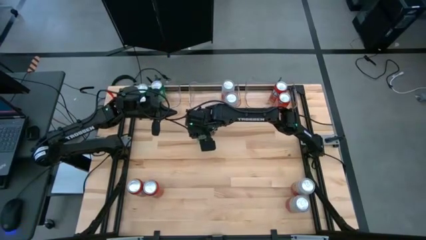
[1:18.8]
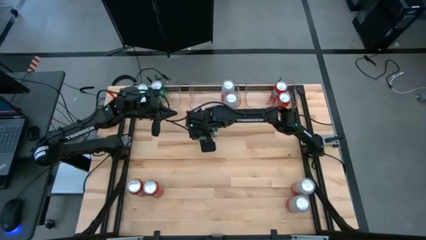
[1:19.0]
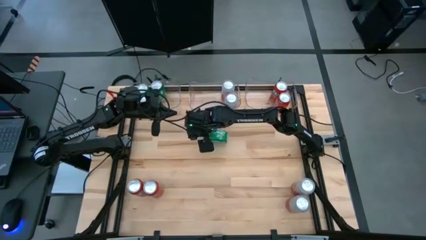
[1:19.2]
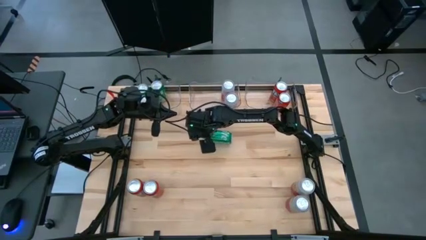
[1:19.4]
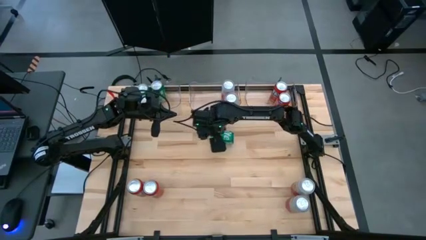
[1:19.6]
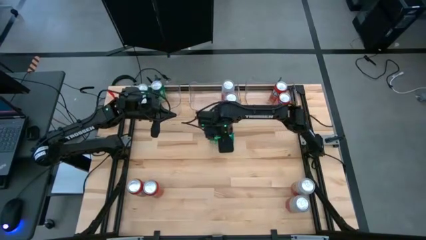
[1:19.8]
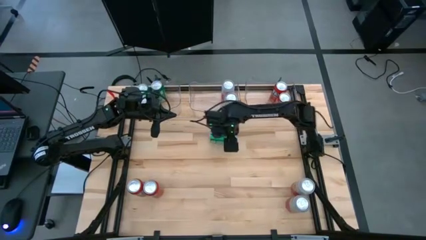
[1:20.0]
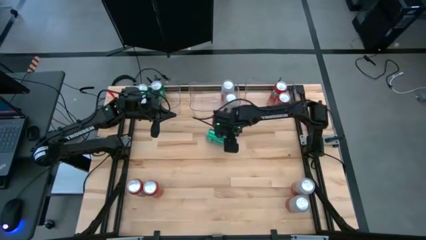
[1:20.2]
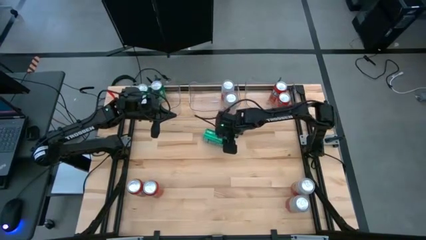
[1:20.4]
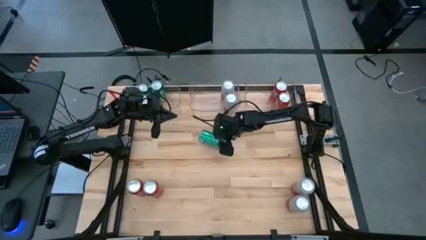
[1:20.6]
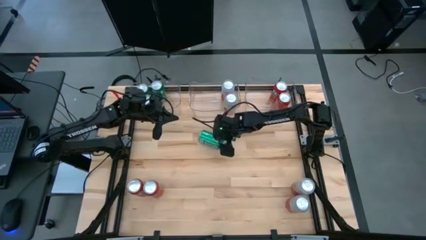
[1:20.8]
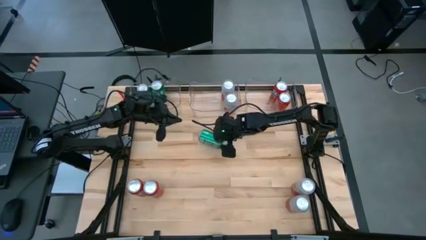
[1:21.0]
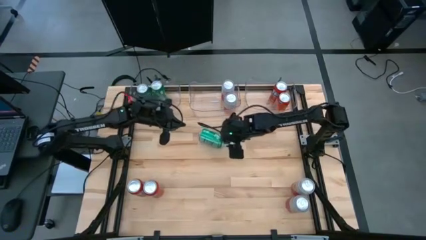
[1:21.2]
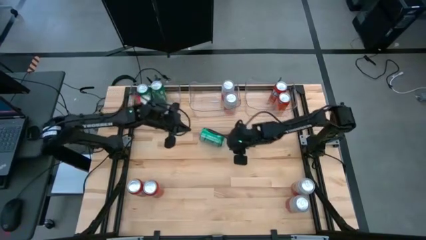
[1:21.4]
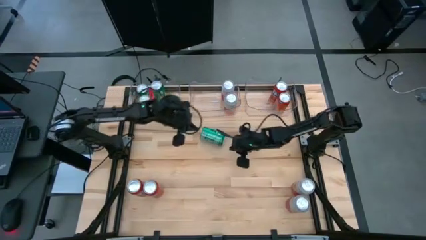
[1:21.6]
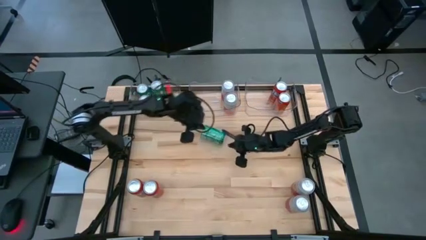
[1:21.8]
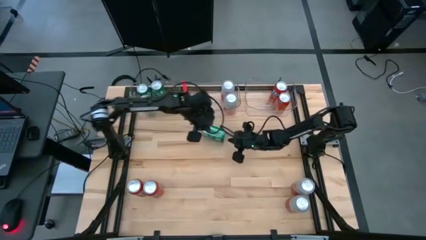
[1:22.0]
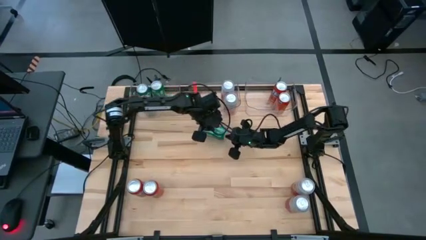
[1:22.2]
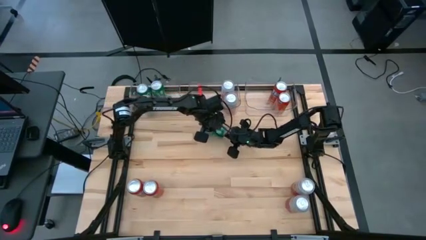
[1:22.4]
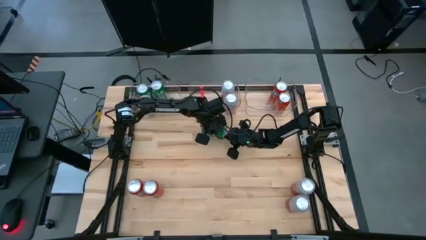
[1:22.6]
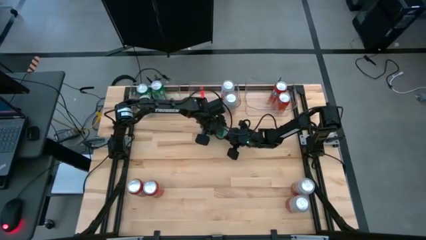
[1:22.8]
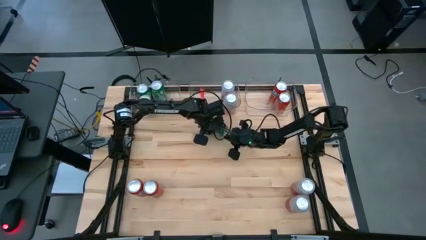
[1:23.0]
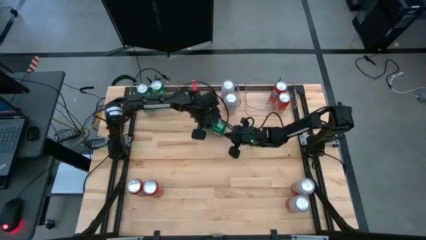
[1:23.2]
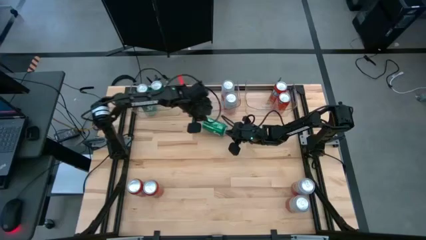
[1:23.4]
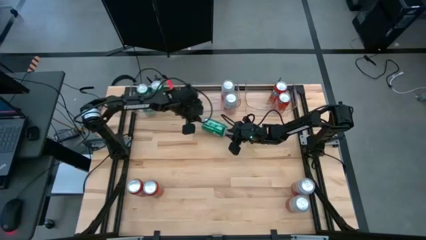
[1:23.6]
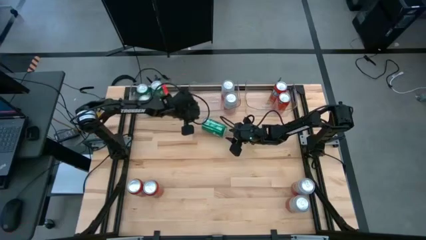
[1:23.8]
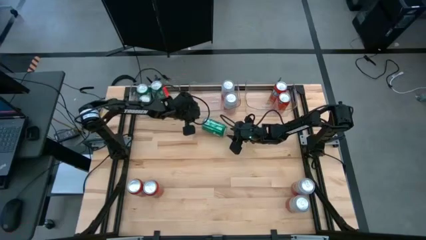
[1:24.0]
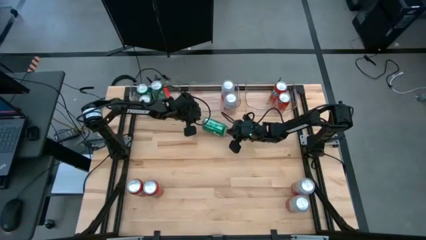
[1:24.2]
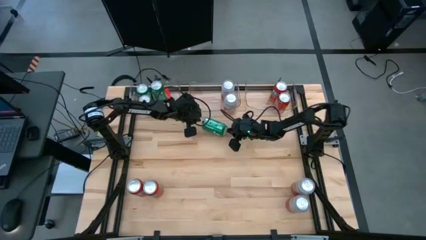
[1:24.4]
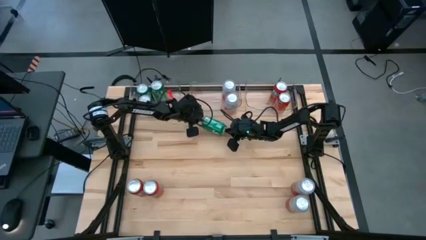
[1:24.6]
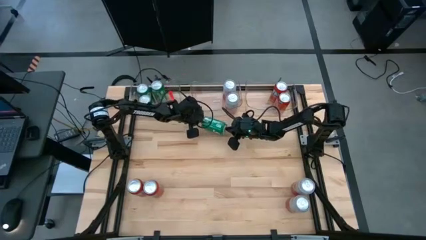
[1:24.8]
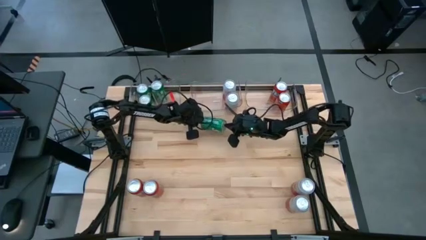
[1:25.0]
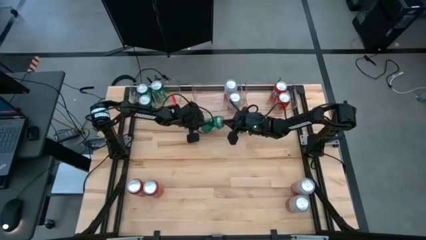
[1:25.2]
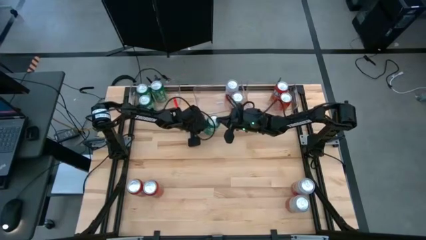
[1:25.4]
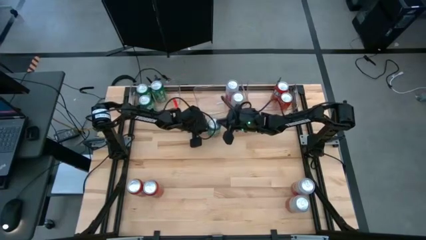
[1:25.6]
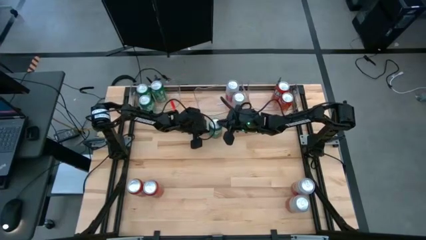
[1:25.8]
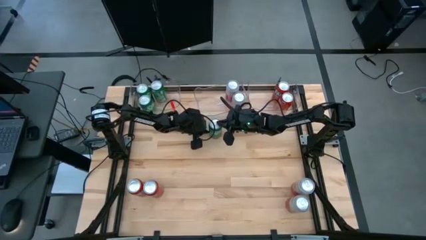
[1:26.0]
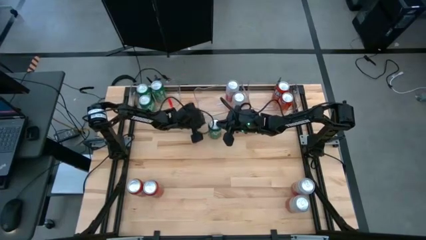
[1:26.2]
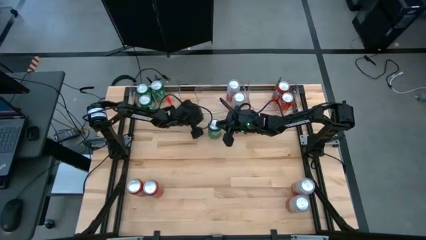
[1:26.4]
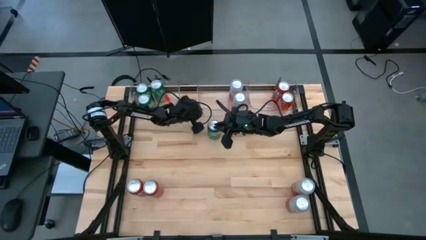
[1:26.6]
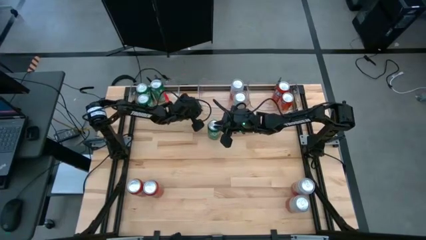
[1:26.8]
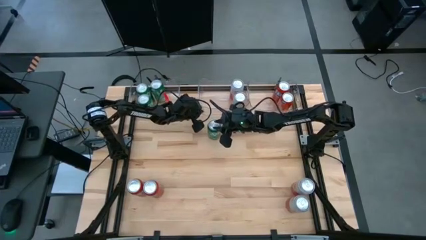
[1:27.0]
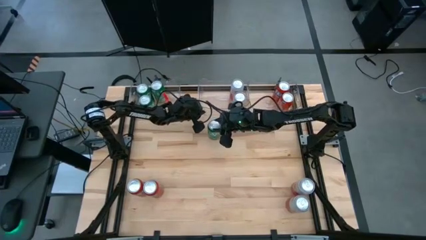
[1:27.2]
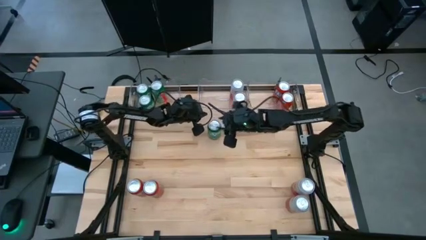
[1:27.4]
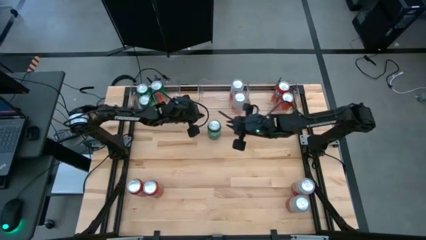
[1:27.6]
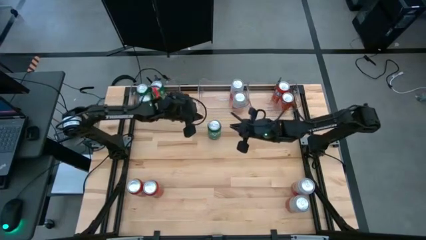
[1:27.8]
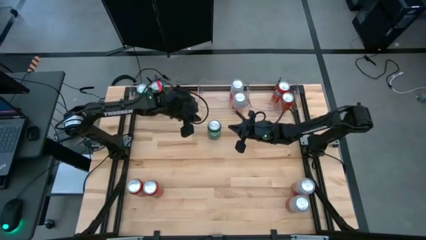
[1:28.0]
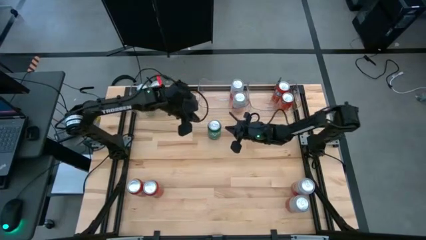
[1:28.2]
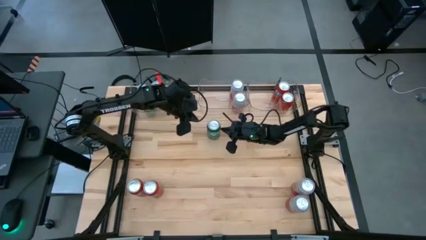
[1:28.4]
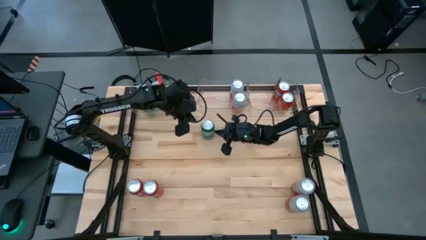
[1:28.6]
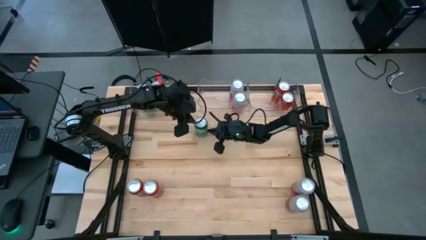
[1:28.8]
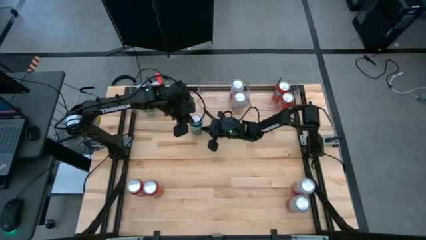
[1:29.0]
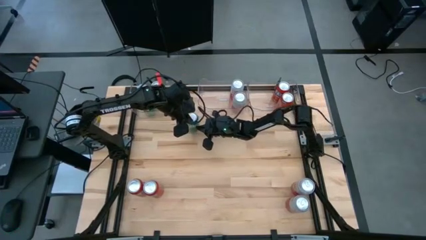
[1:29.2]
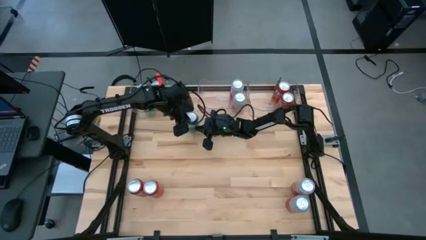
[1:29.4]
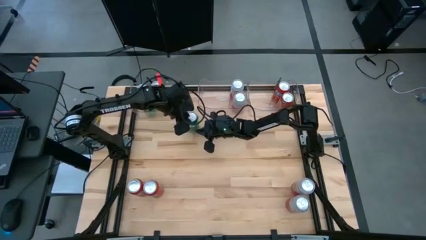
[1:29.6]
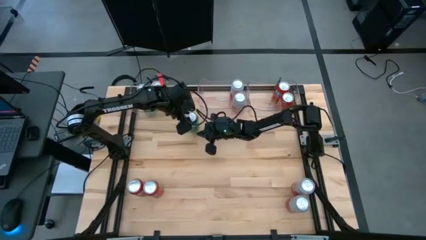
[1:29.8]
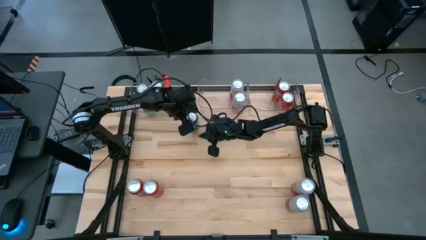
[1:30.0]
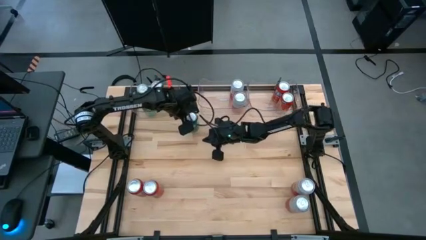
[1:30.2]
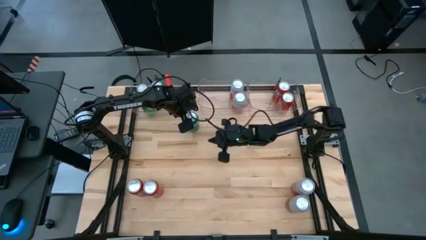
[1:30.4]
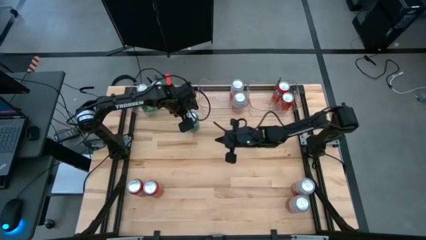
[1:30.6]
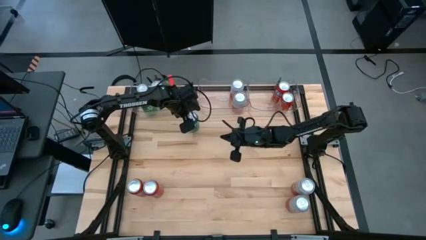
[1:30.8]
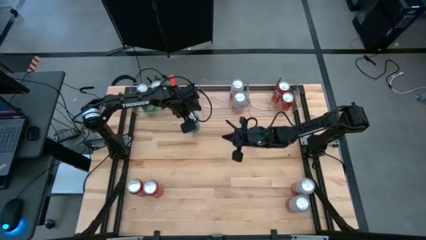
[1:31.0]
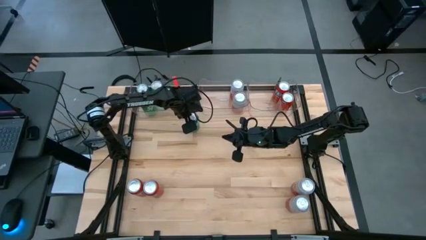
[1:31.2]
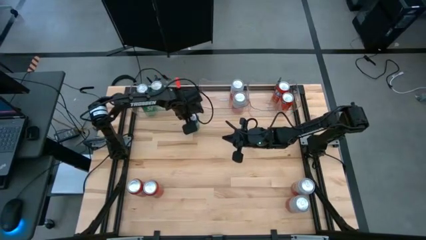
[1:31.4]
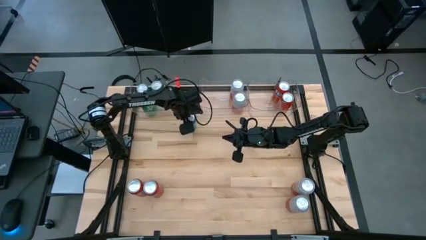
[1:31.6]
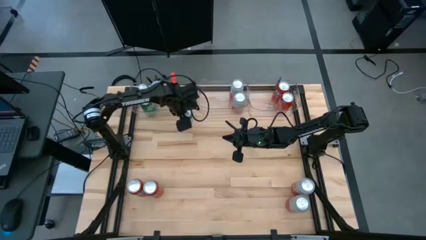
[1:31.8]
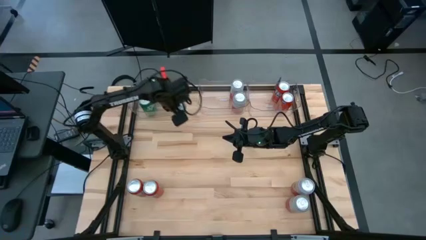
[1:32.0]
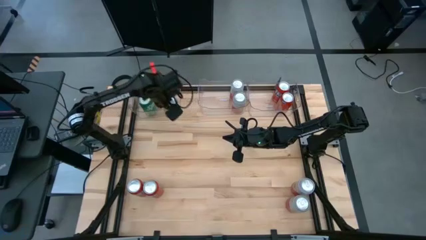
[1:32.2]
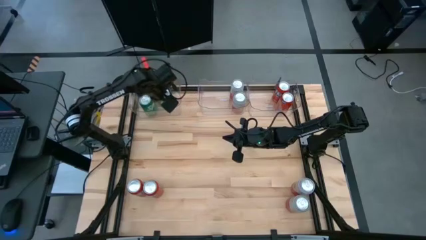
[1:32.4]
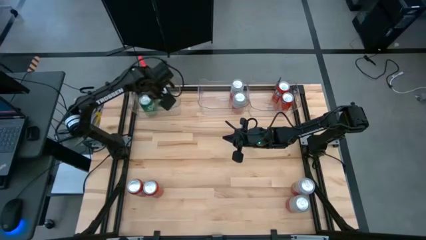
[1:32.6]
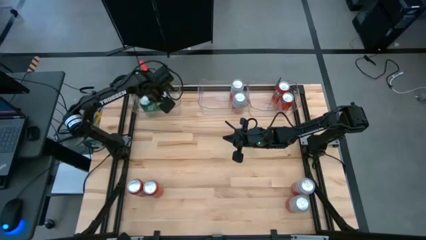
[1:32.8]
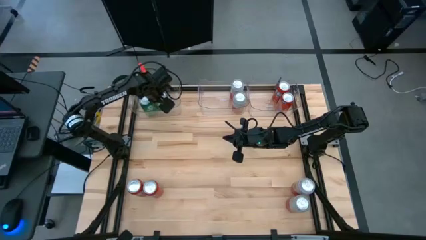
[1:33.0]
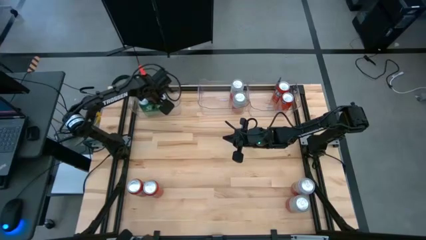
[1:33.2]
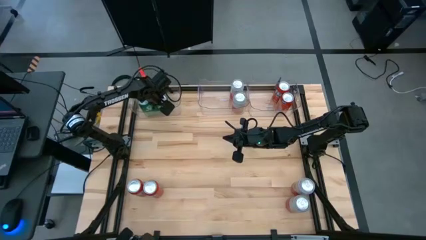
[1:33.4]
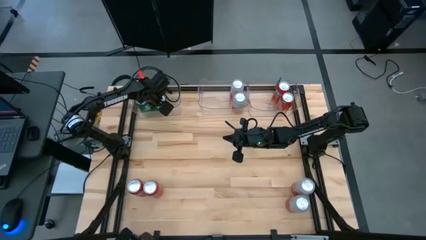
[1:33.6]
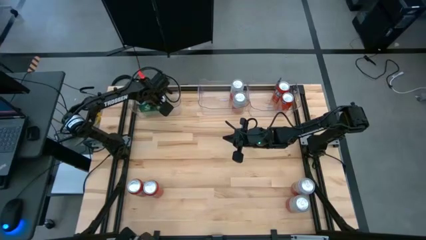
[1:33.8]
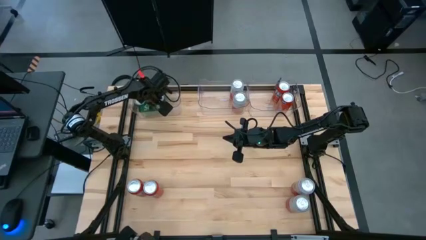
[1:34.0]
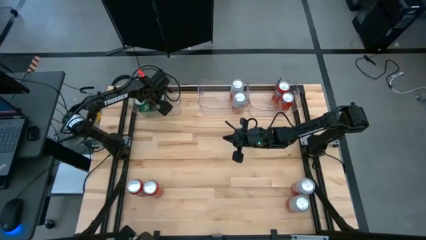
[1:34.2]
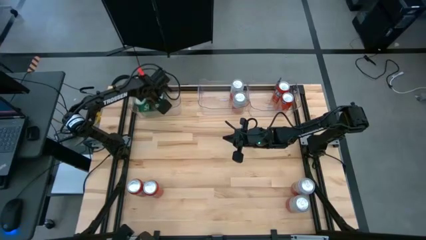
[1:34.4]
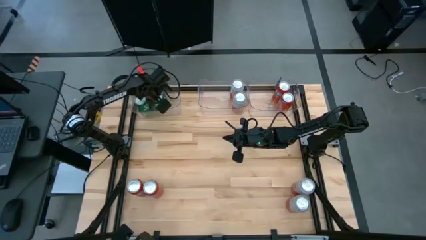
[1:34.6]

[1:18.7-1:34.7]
Task: Sort soda cans
Put the green soda can into the left transparent bin
